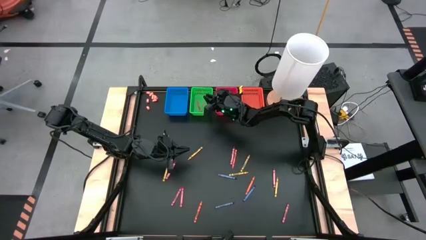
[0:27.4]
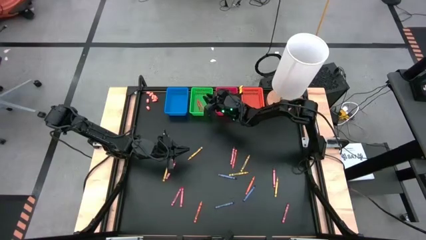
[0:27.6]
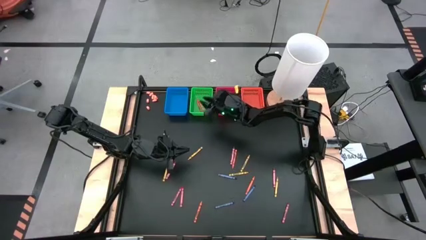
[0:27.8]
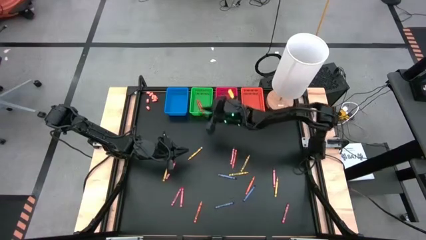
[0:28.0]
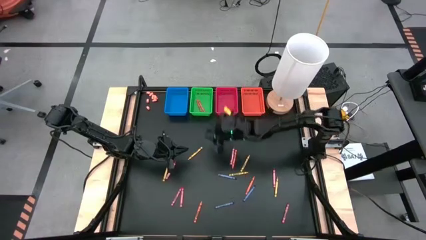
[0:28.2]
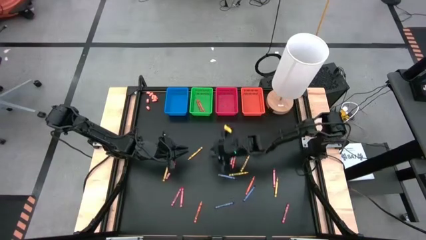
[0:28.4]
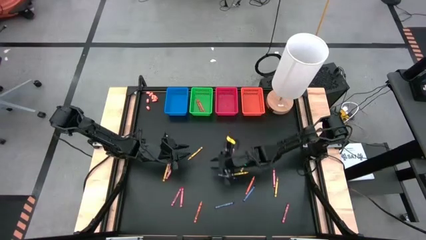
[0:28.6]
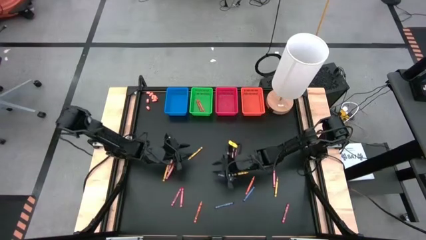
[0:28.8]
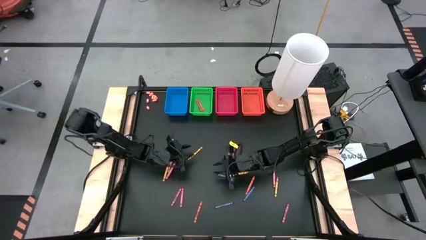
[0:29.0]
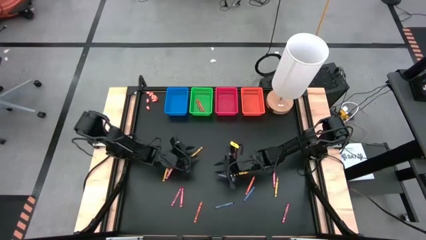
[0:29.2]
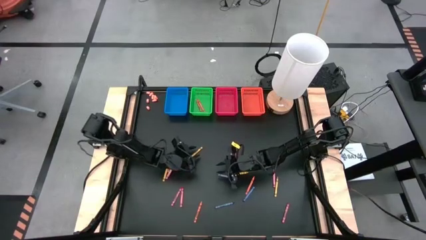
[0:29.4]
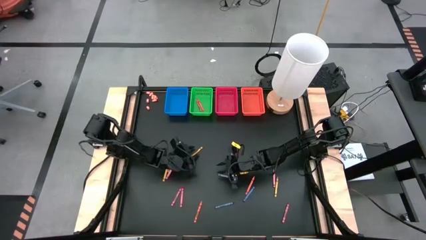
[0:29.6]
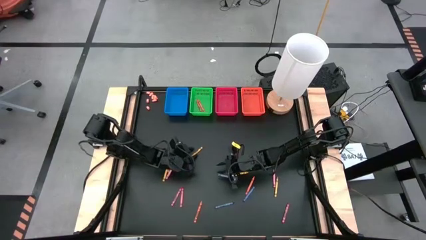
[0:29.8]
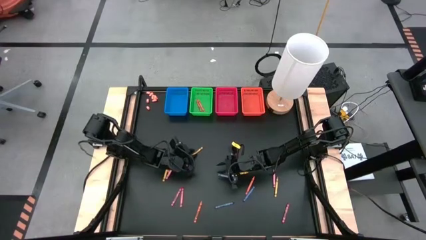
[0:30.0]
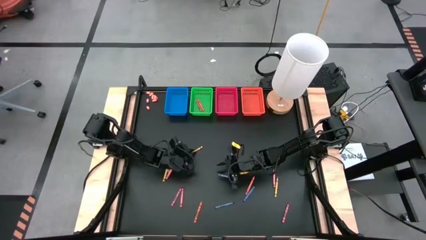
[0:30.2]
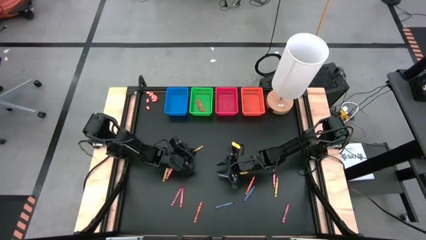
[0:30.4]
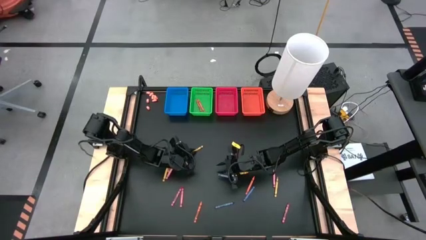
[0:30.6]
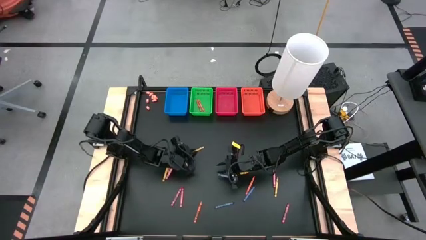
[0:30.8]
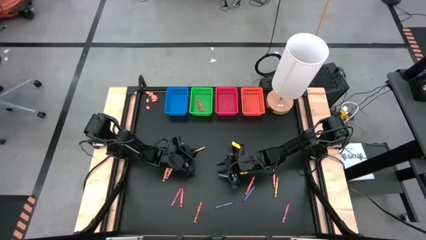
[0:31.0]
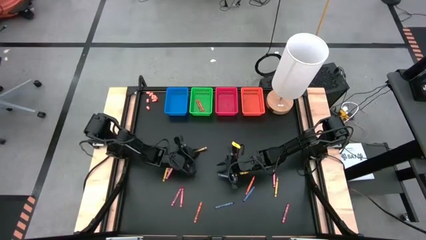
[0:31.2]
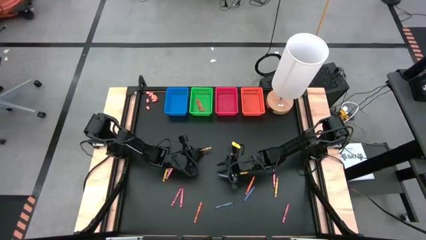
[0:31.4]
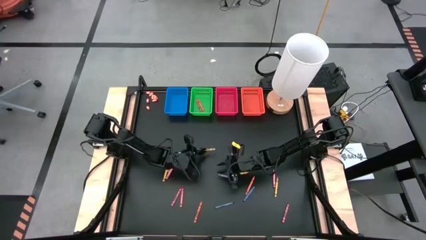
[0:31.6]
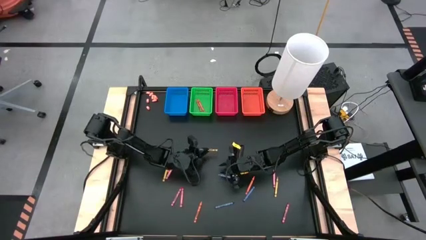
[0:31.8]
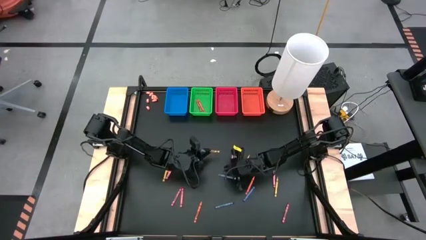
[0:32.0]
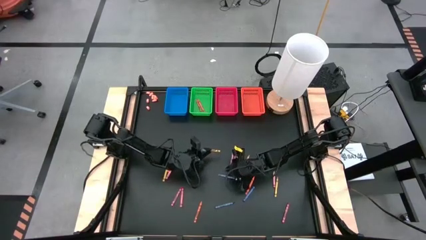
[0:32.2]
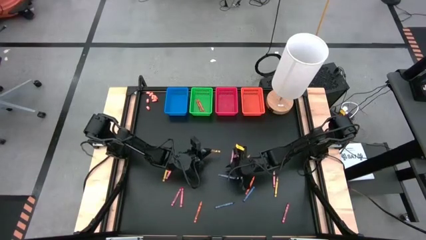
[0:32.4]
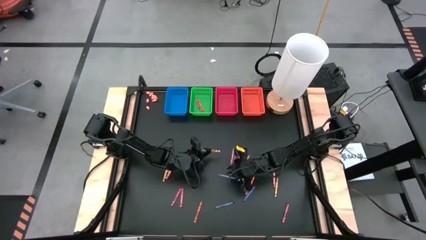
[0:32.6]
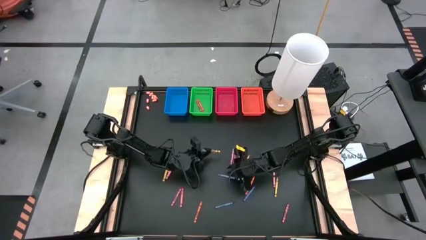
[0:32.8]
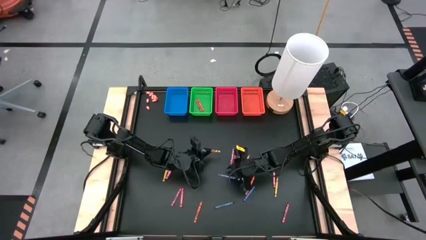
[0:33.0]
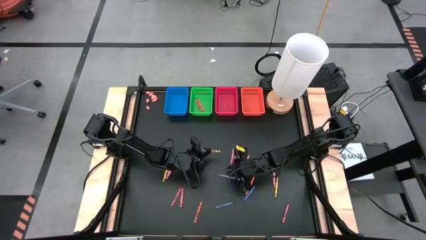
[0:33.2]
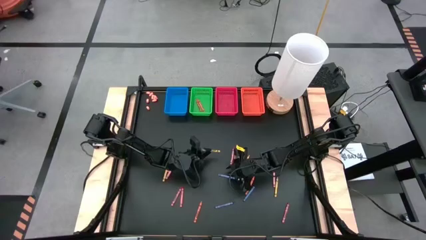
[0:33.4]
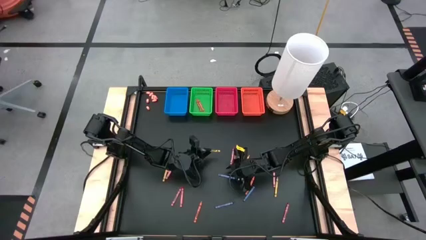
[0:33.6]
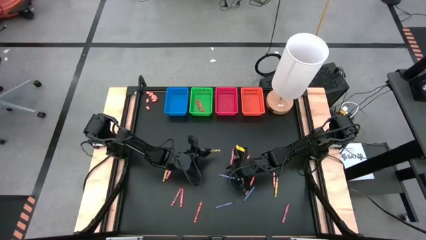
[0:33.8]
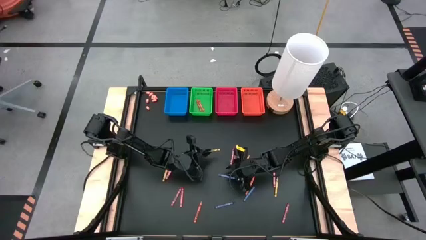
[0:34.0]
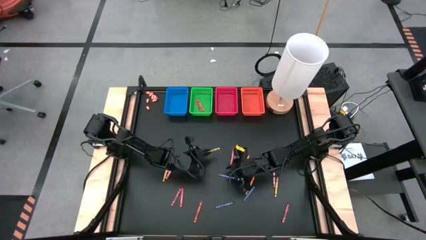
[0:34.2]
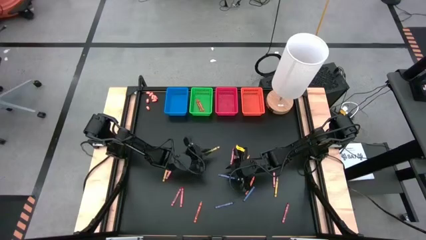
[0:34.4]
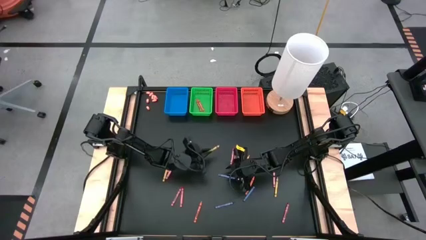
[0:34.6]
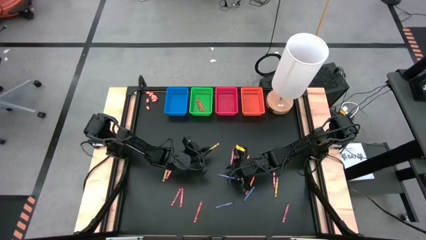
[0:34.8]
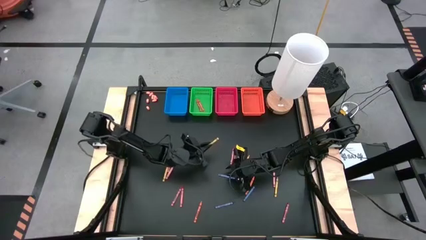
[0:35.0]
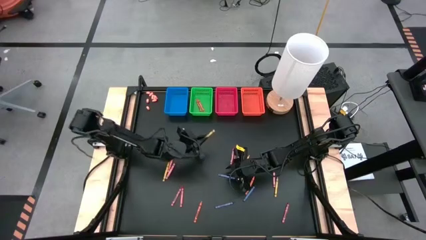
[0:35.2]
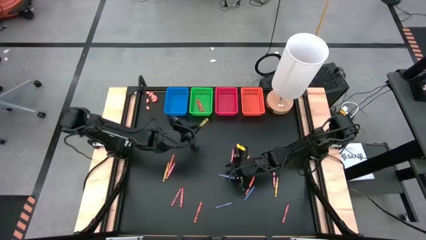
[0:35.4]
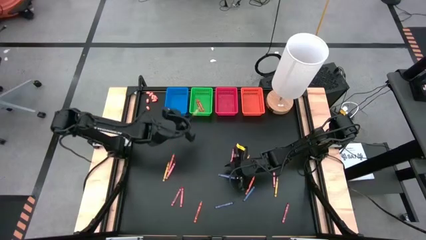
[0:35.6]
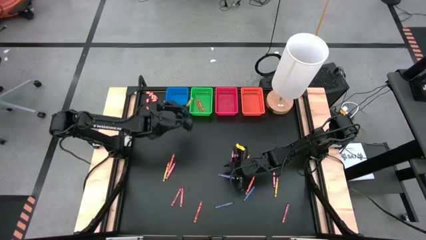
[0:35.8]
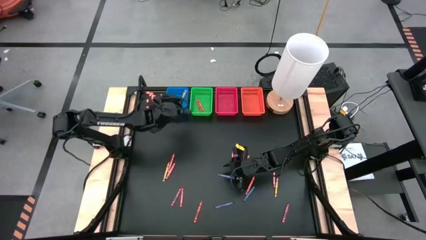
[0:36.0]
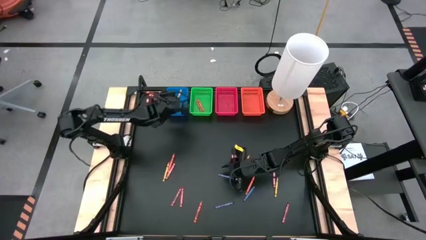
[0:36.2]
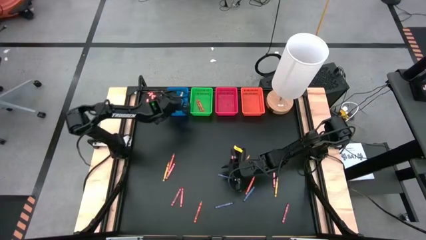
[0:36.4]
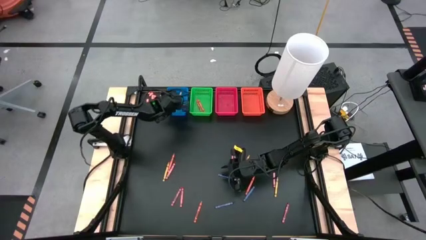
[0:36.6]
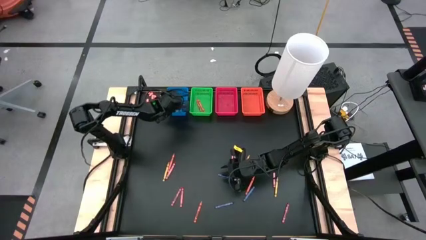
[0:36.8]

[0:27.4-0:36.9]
Task: Sort crayons
Put the yellow crayon into the blue bin

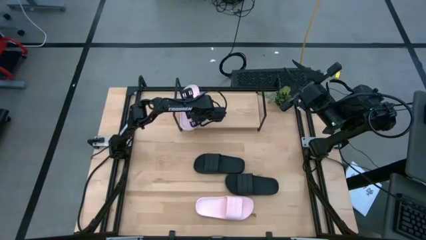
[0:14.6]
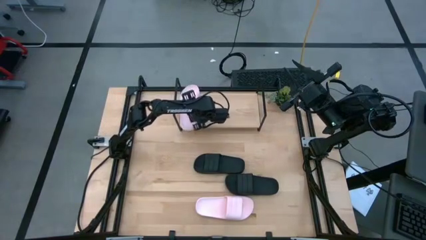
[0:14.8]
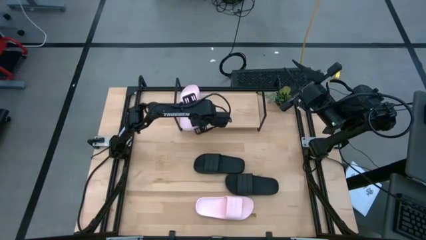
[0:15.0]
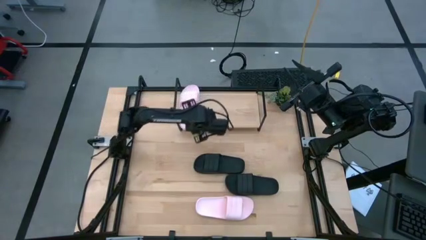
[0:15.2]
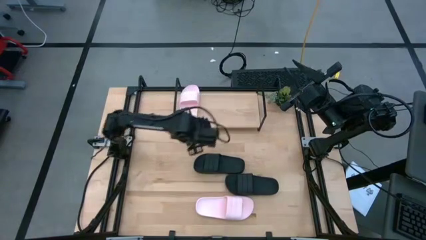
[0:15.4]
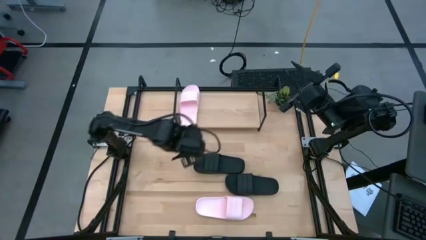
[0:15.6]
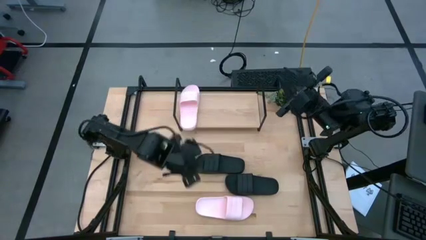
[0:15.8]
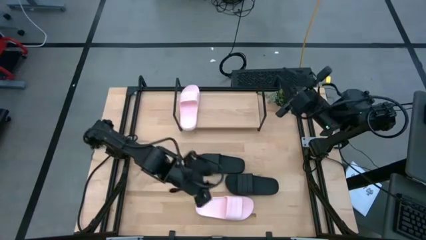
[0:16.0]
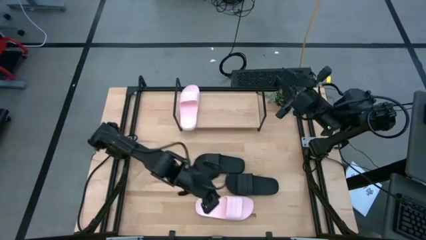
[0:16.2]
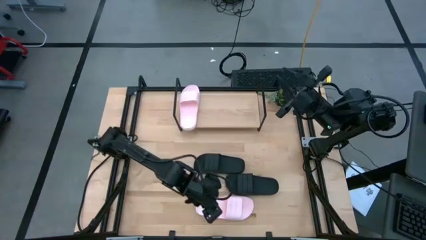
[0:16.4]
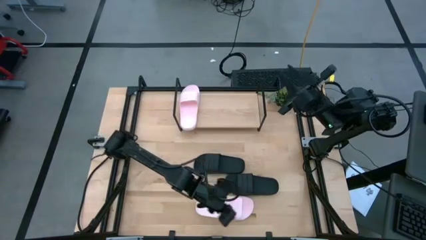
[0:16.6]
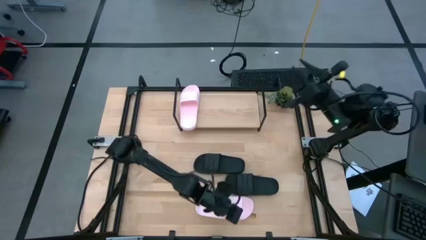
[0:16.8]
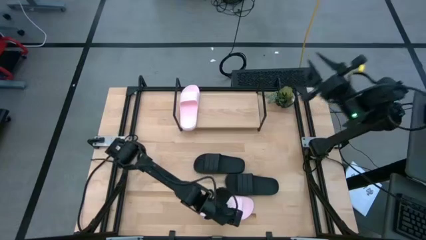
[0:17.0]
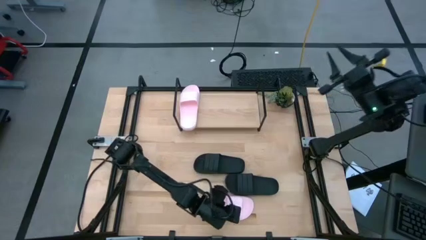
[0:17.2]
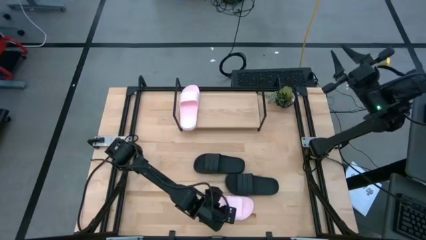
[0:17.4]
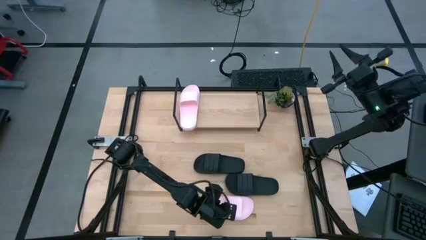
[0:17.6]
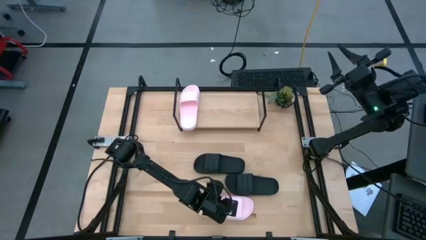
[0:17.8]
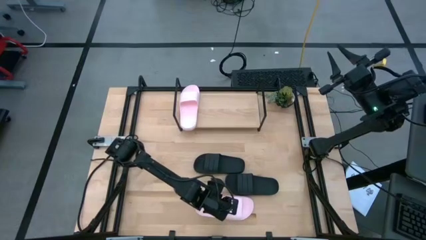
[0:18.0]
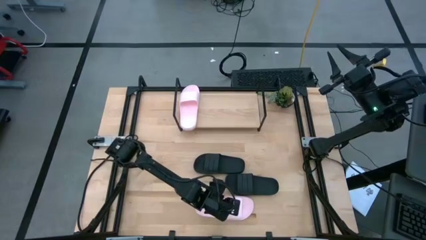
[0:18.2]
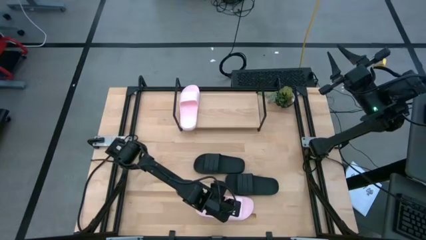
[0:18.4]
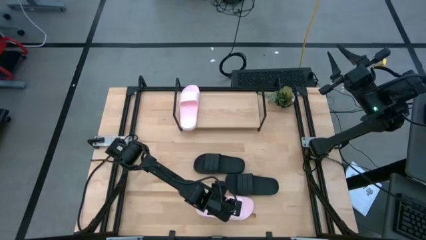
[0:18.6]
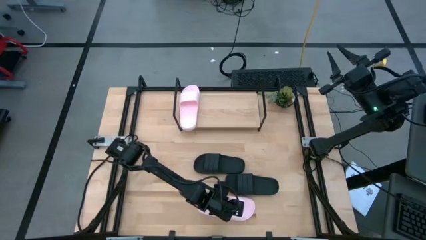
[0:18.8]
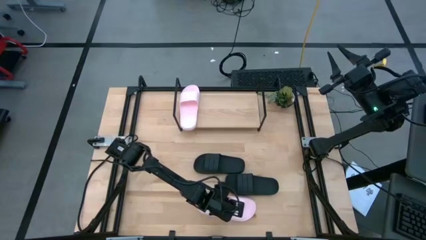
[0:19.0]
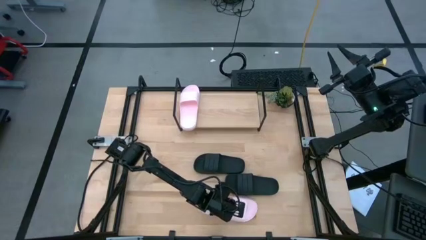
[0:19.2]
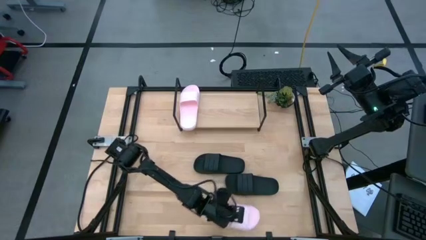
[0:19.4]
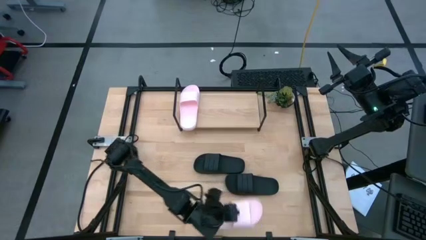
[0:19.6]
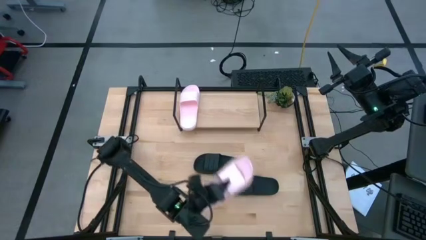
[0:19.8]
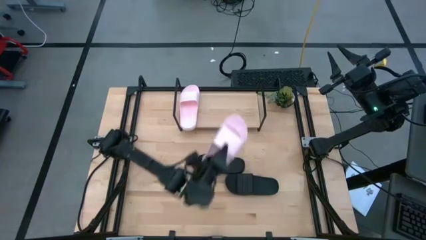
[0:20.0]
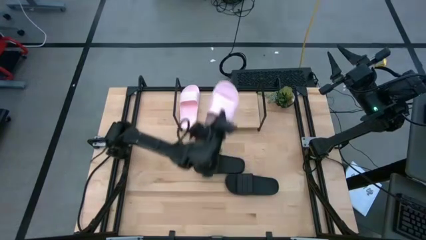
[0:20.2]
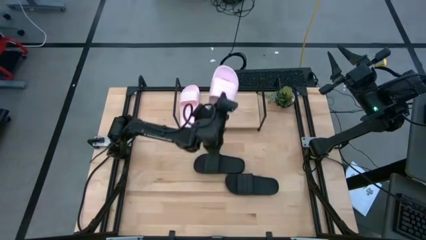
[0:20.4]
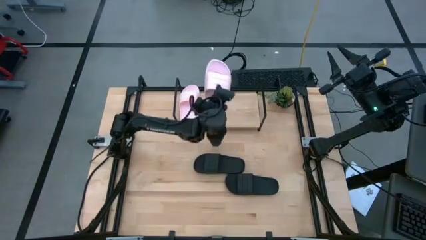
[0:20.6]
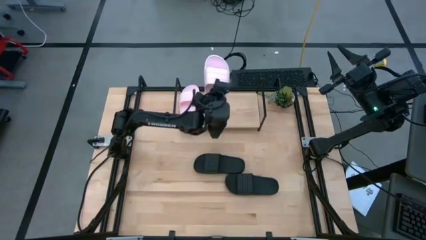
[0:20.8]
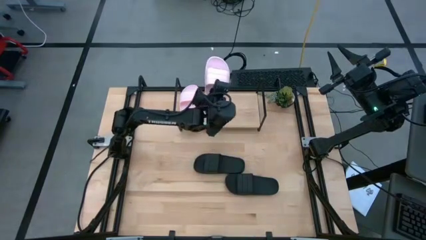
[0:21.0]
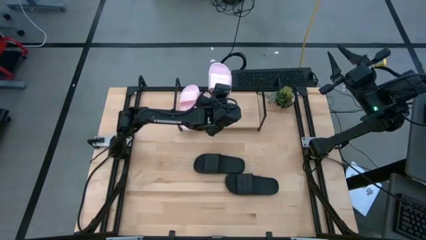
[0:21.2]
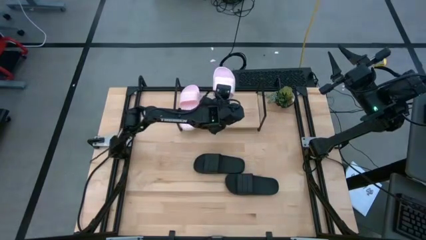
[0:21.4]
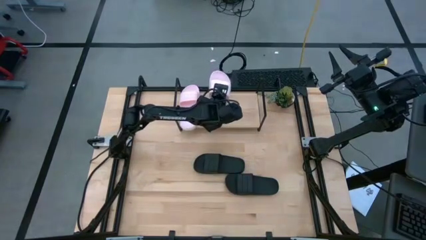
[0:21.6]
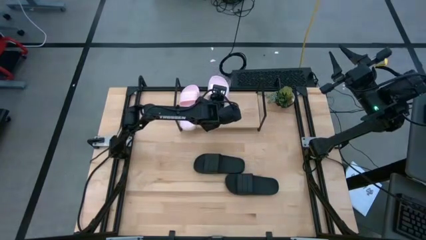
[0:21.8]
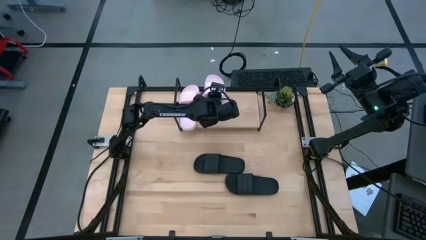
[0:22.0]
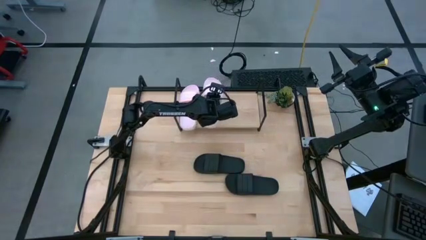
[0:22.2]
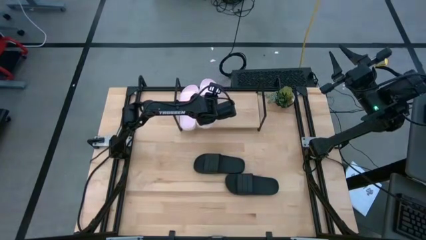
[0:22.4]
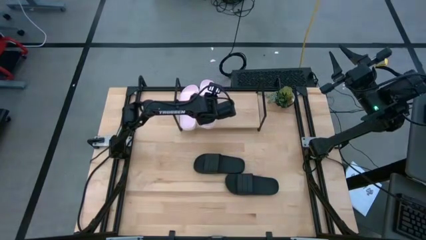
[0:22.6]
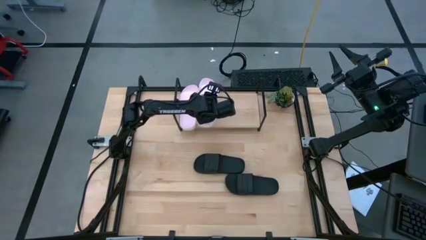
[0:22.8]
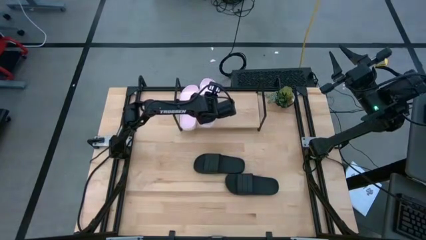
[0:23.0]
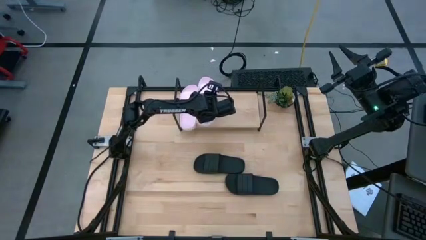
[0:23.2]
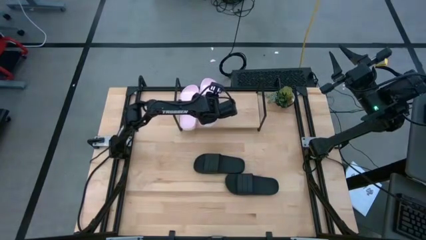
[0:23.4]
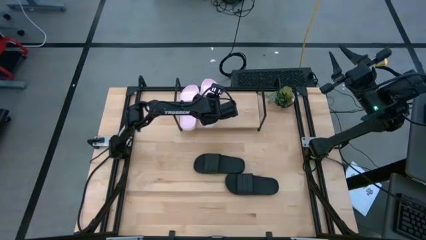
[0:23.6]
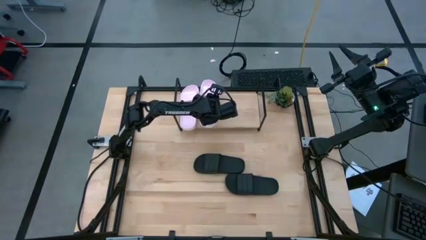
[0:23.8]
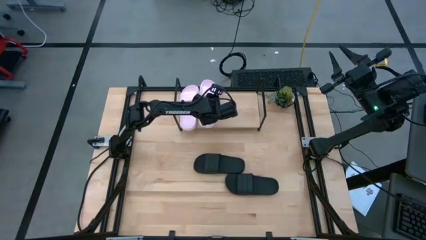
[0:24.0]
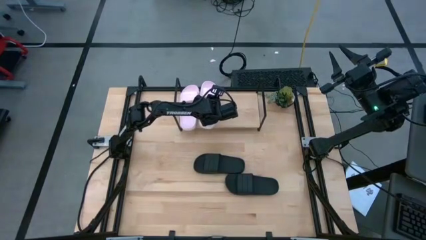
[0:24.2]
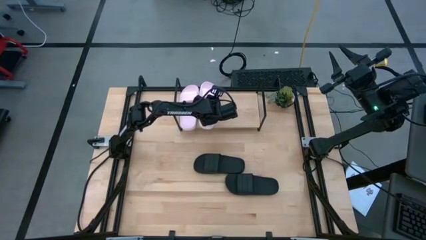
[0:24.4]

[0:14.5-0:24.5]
Task: Pick and place slides into the shelf
Put the pink slipper on the shelf
